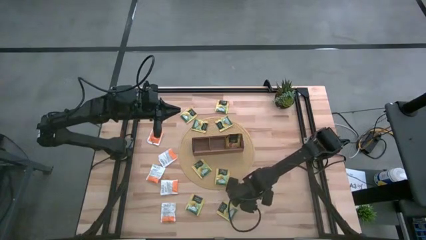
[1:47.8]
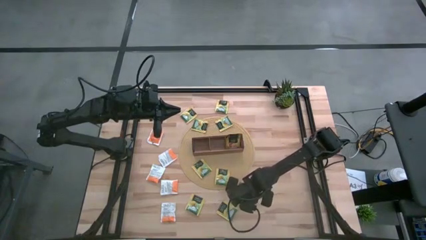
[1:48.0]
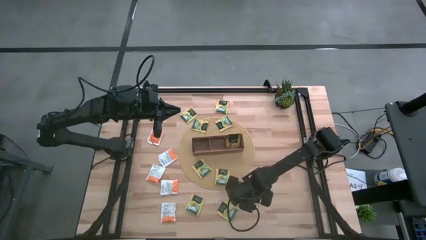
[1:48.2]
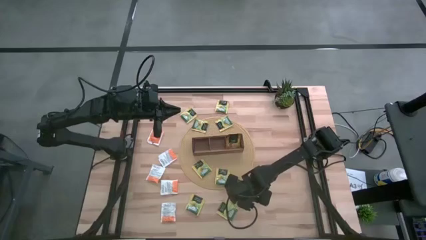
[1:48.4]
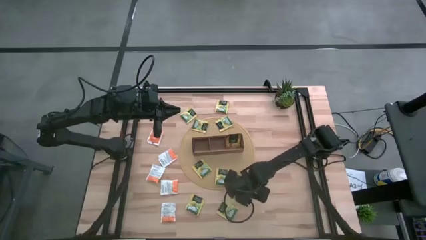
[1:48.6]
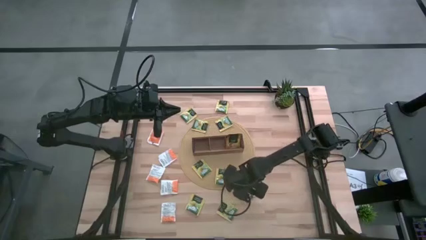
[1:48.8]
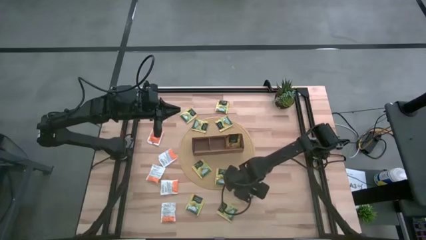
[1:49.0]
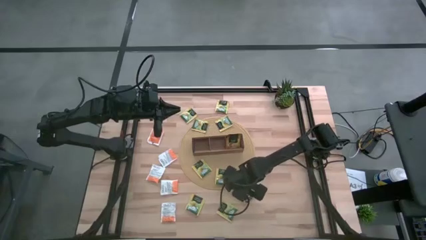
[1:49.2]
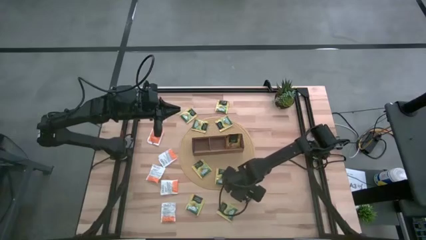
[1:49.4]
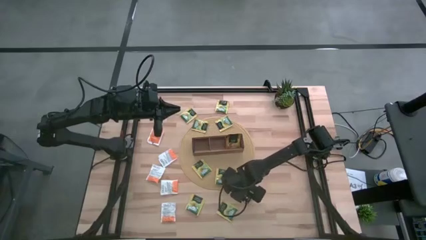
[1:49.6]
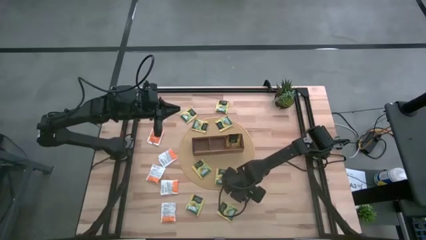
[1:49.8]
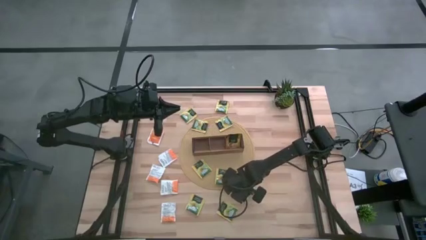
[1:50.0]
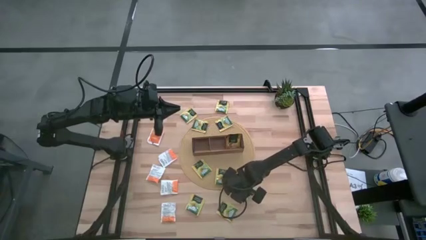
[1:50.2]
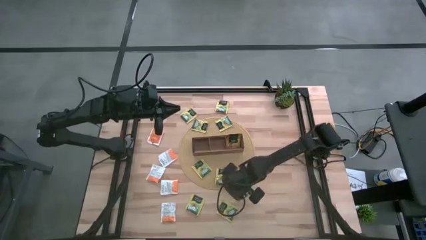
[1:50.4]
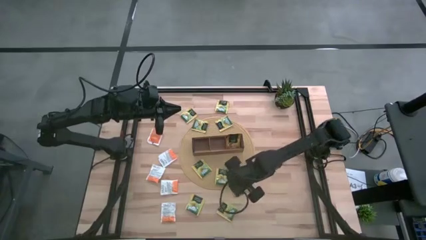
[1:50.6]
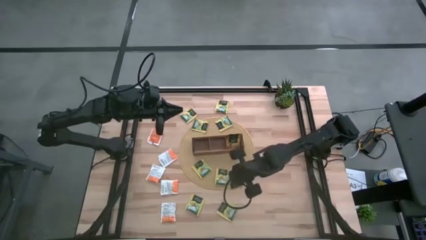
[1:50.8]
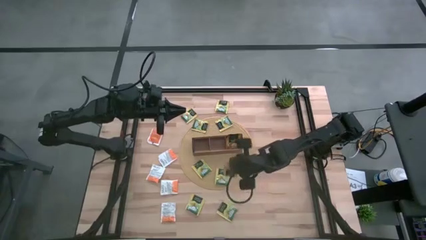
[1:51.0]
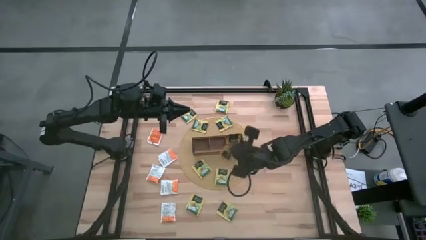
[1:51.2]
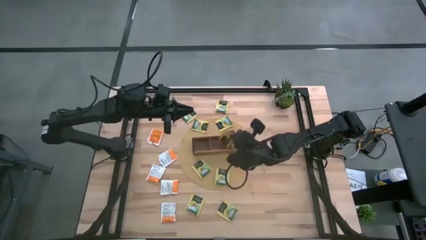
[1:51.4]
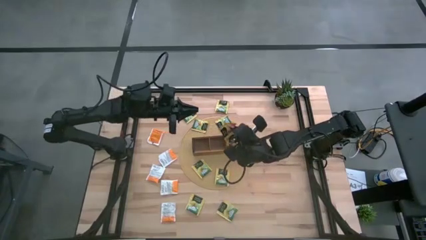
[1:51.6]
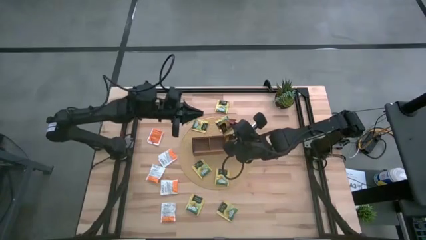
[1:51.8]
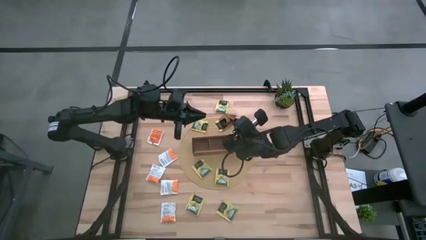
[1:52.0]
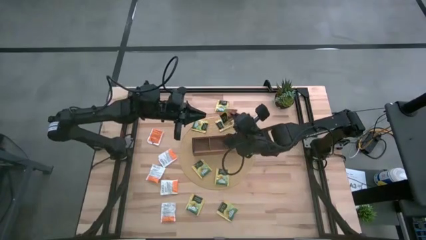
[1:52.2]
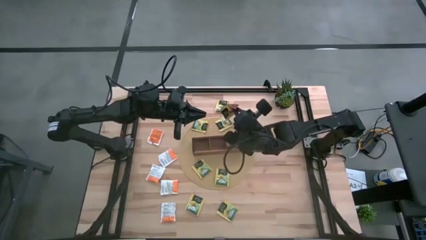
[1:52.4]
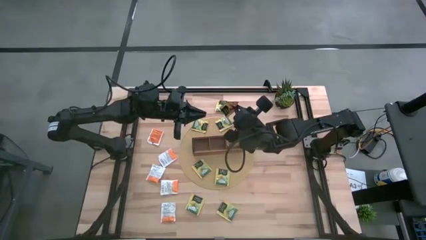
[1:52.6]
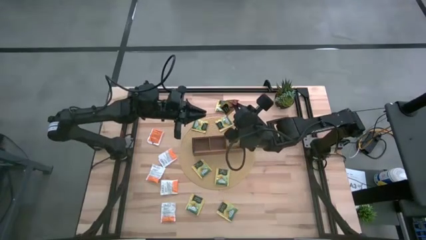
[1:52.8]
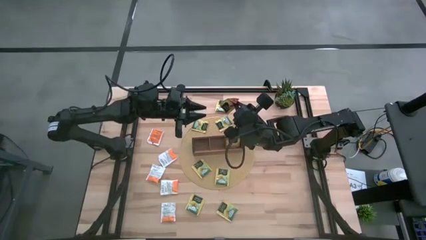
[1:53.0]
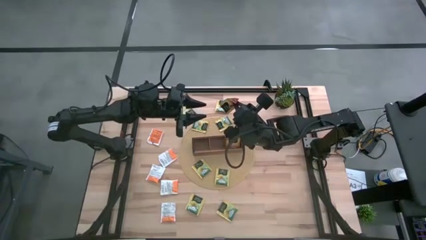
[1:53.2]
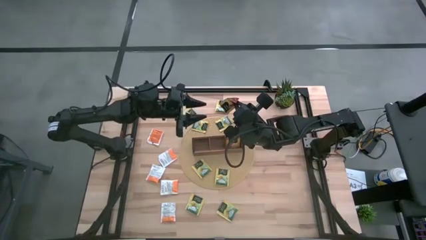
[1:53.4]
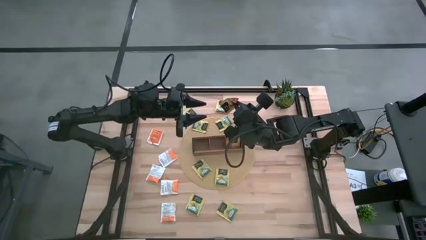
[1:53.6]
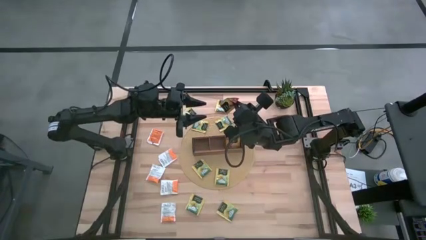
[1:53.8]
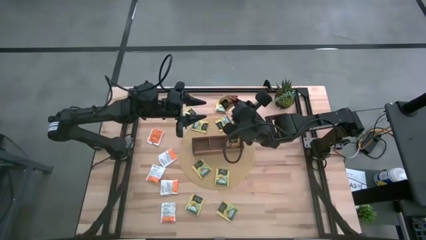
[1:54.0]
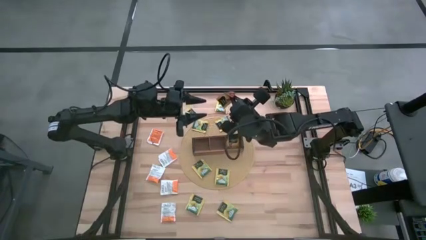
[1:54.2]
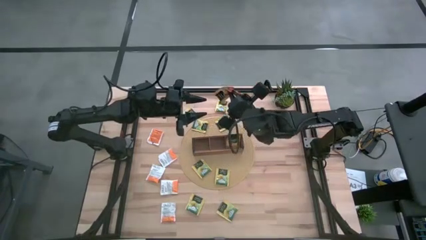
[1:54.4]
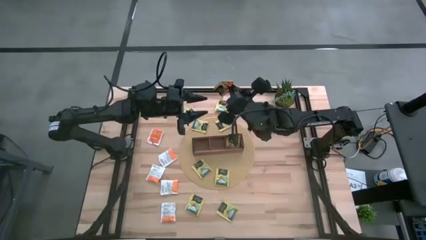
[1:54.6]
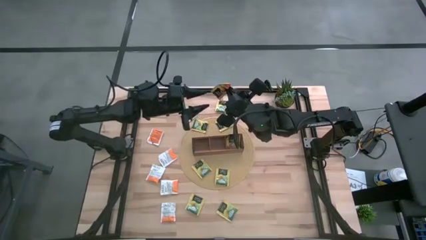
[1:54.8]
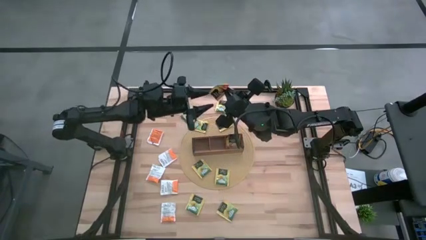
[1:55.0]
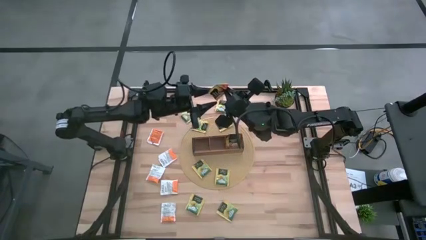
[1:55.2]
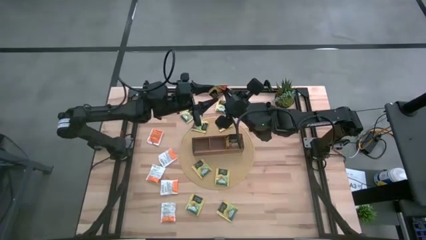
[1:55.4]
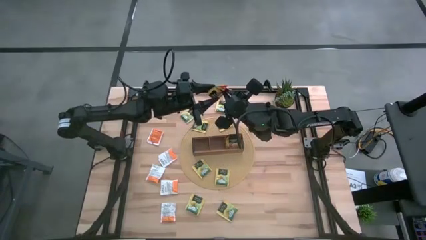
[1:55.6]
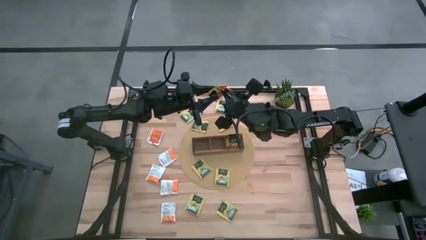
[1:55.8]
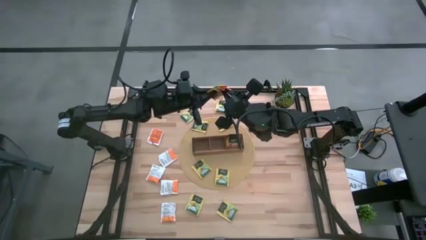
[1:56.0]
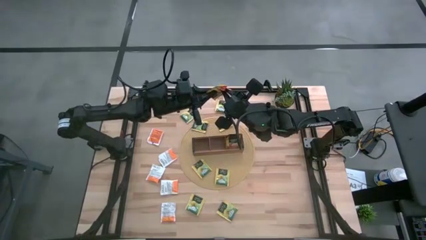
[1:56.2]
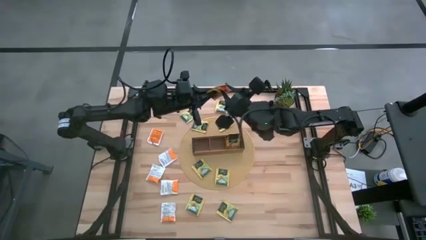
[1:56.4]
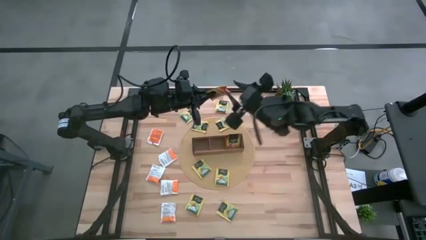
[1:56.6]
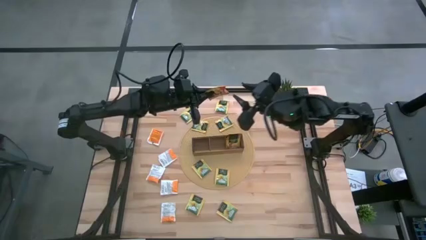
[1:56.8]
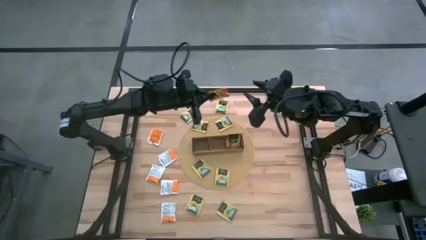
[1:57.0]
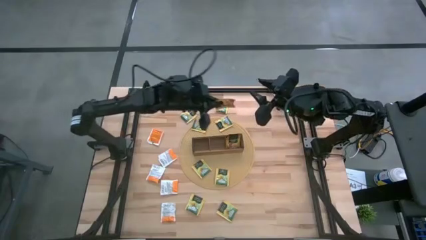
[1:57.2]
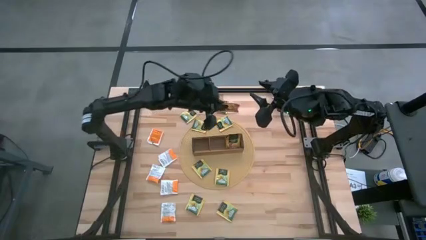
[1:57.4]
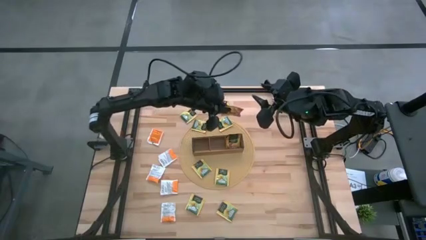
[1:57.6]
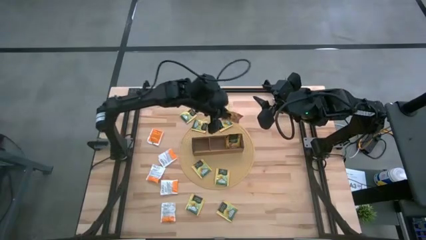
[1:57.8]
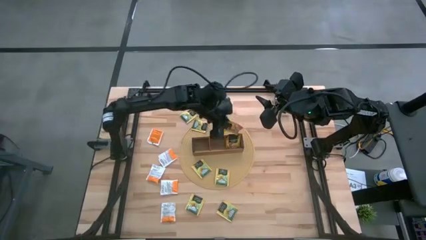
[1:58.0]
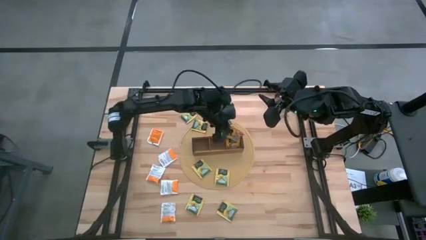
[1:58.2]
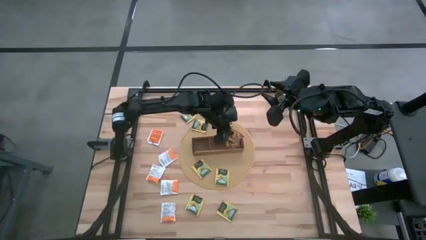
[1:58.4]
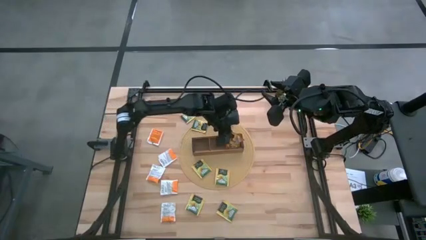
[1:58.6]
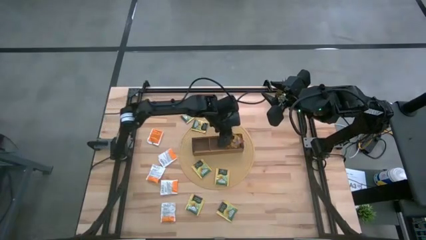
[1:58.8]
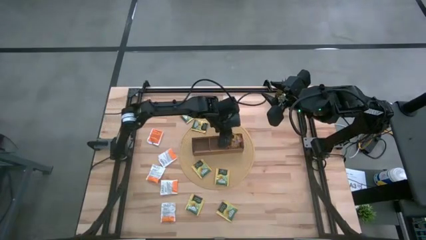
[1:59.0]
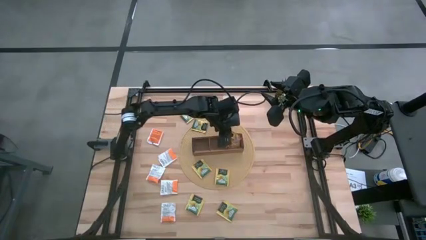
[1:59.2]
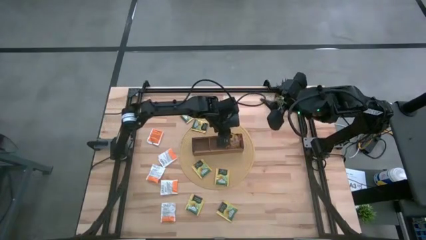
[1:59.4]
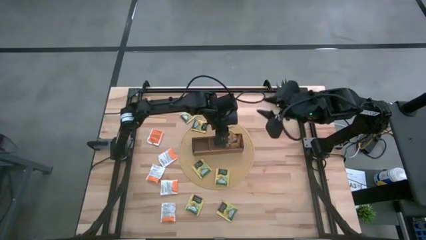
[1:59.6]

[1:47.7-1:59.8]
Task: Pick & Place Tea
Put the orange tea bag into the right section of the wooden organizer

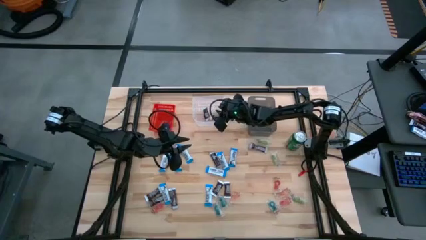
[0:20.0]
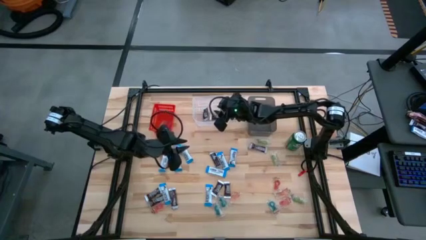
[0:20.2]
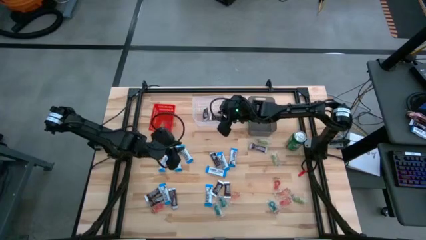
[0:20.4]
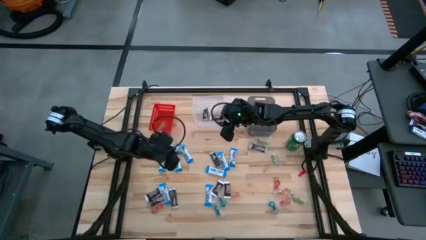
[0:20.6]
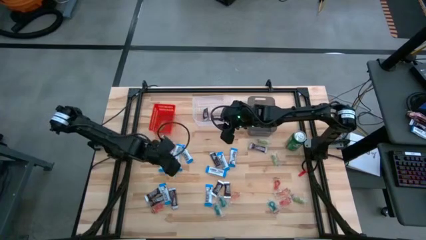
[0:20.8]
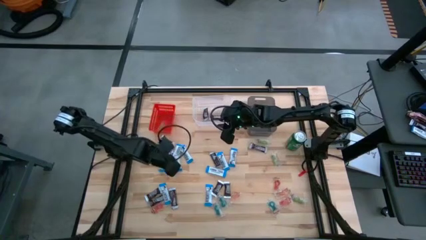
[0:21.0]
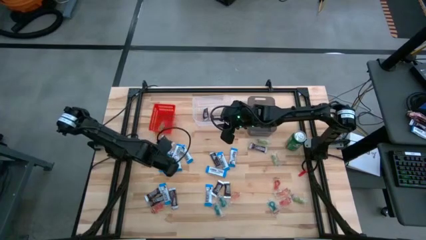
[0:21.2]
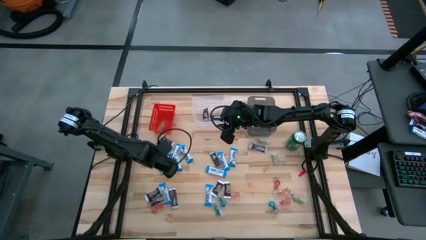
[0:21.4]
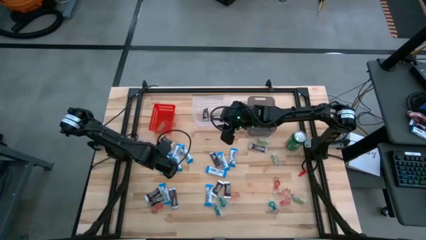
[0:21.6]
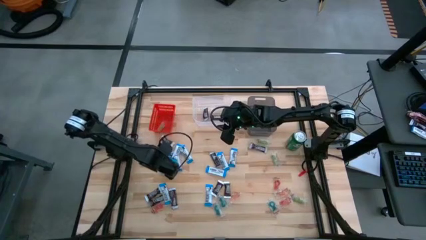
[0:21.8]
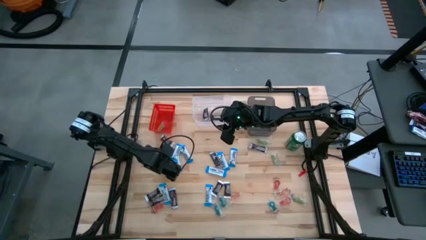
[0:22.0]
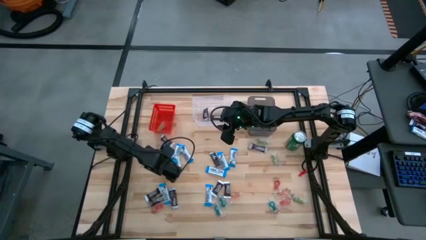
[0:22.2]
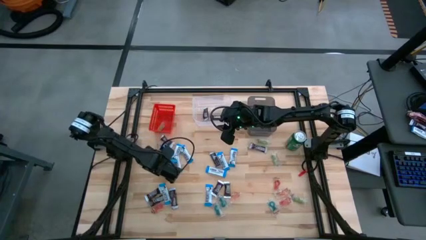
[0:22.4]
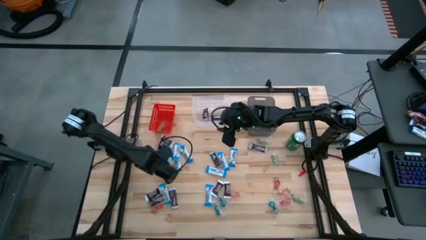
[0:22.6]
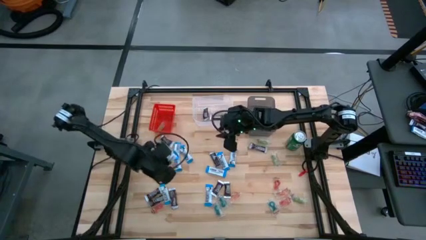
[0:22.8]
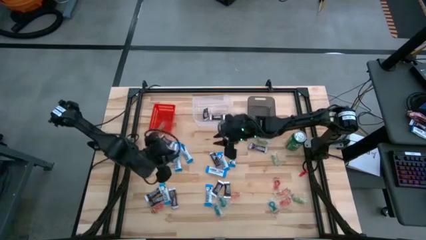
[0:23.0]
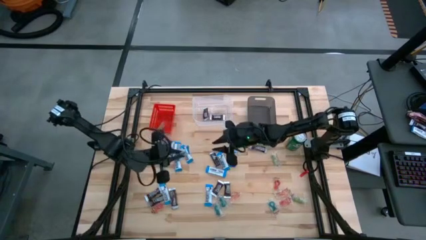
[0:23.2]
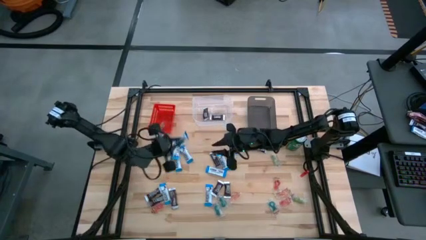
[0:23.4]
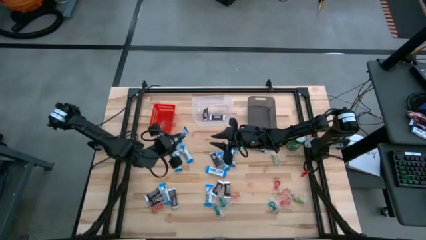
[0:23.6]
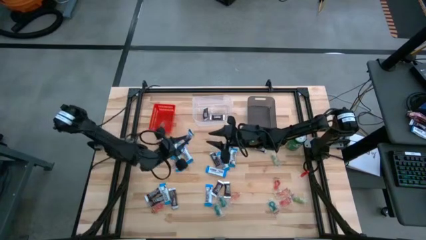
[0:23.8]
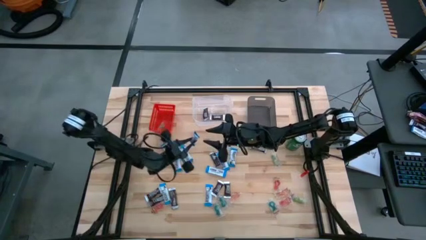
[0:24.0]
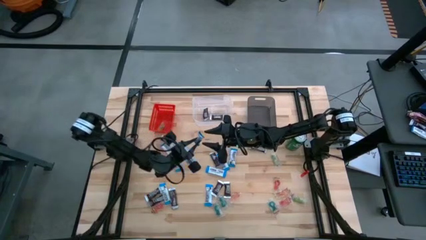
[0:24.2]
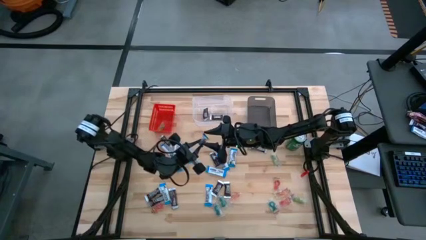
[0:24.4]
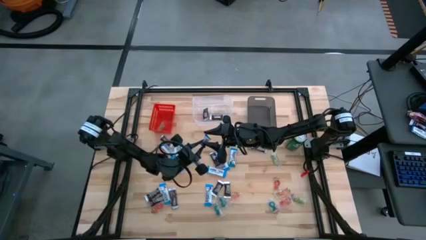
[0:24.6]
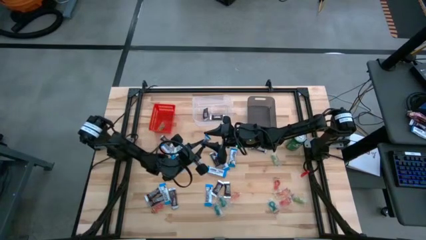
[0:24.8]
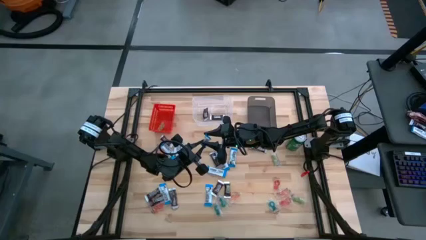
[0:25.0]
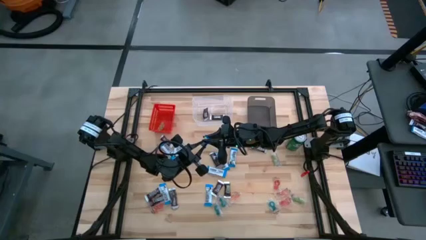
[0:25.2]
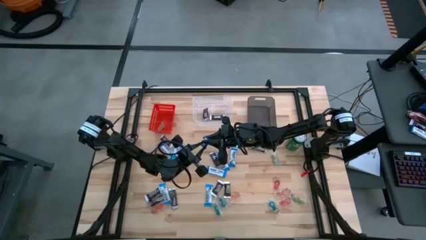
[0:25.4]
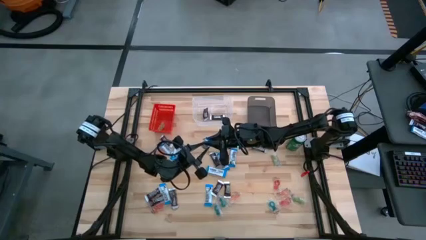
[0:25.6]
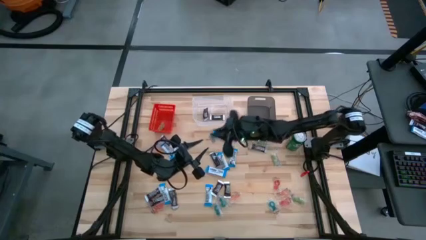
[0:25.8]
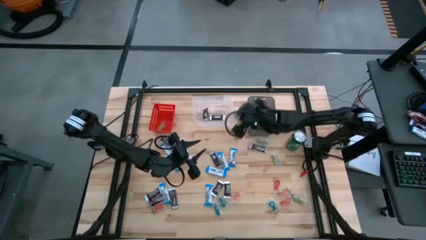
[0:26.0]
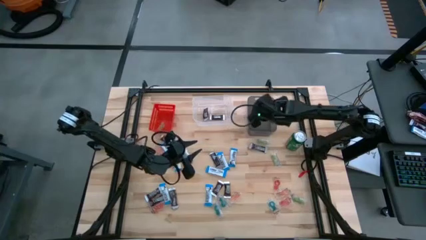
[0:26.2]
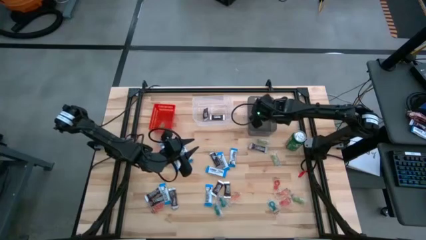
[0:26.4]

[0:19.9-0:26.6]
Task: Sort candy
Put the white chocolate bar into the black bin
